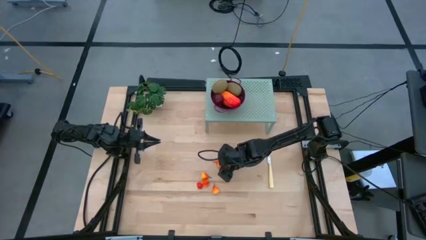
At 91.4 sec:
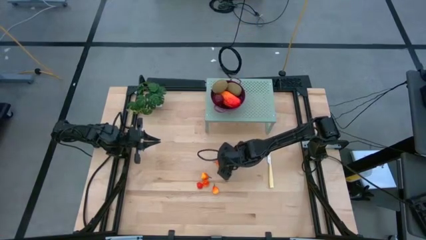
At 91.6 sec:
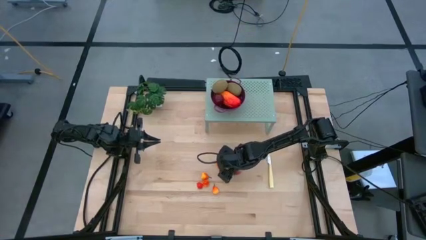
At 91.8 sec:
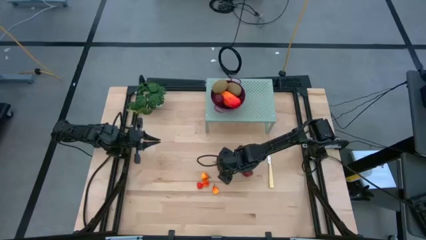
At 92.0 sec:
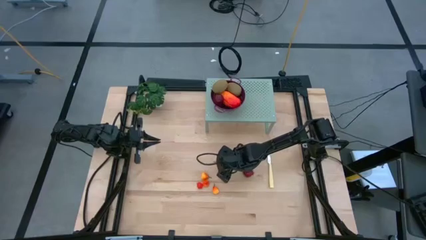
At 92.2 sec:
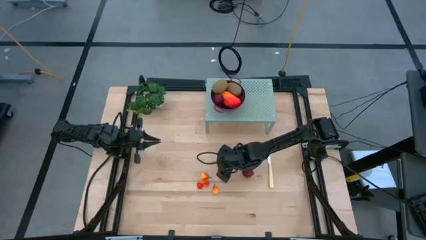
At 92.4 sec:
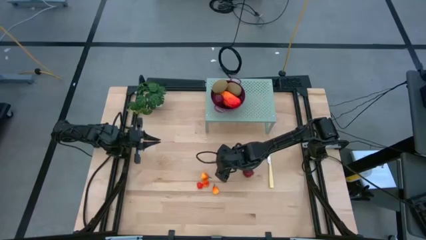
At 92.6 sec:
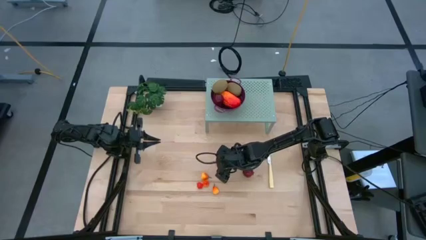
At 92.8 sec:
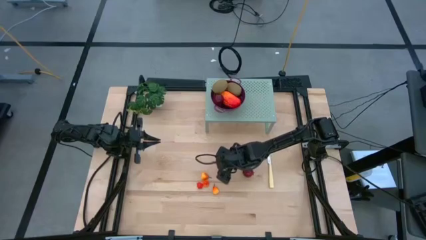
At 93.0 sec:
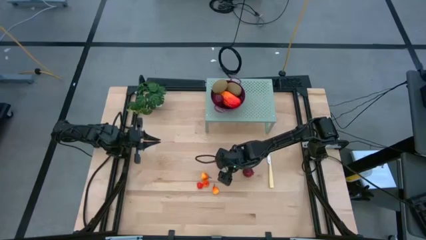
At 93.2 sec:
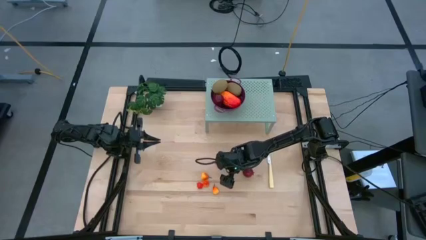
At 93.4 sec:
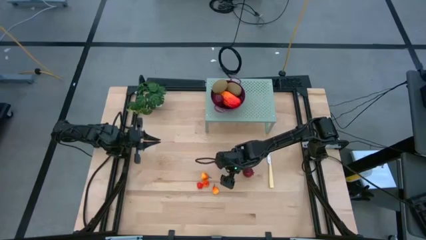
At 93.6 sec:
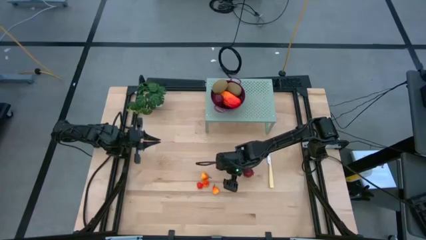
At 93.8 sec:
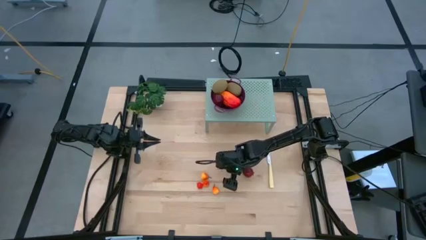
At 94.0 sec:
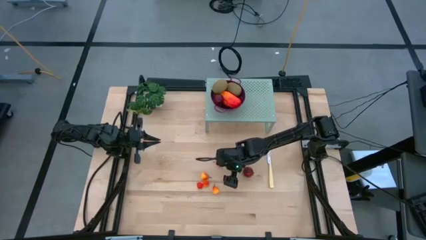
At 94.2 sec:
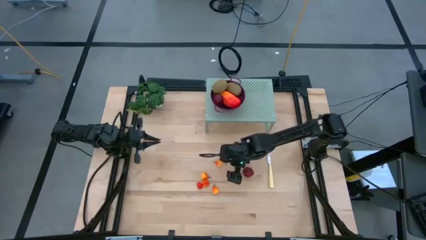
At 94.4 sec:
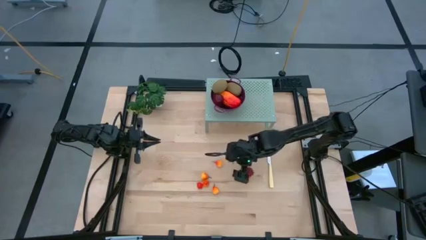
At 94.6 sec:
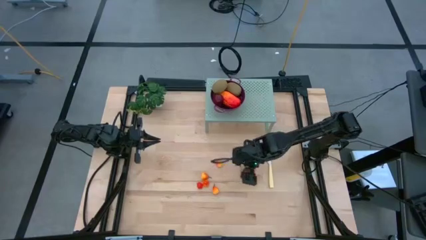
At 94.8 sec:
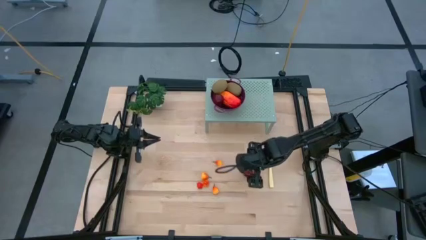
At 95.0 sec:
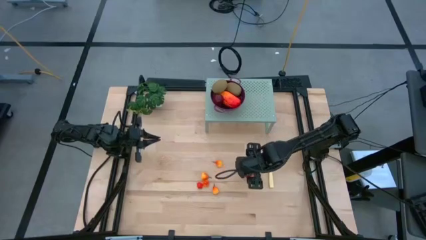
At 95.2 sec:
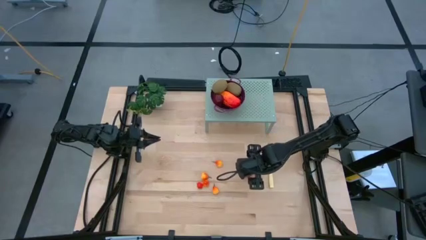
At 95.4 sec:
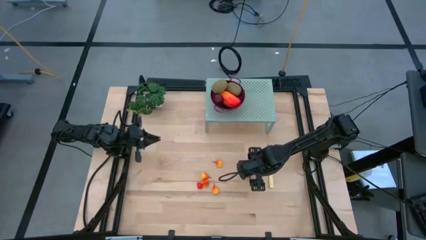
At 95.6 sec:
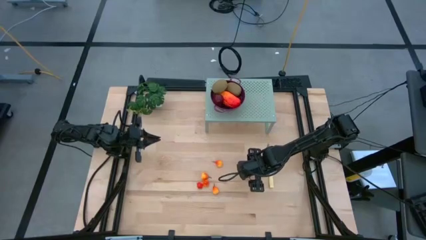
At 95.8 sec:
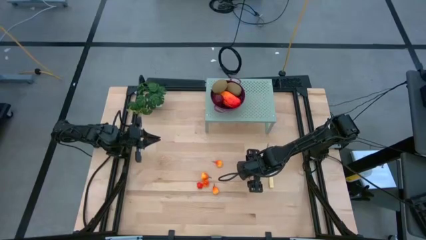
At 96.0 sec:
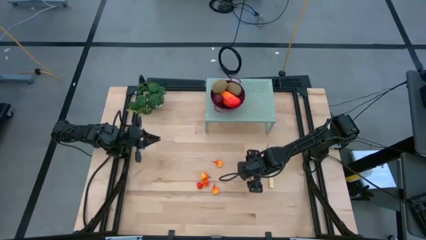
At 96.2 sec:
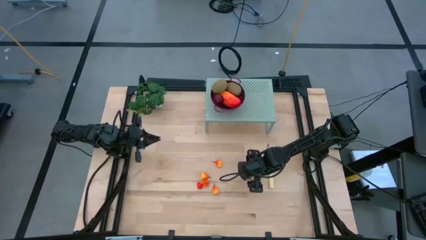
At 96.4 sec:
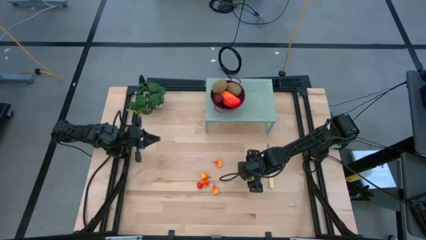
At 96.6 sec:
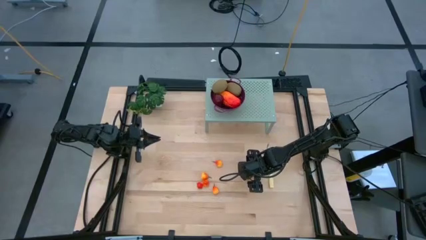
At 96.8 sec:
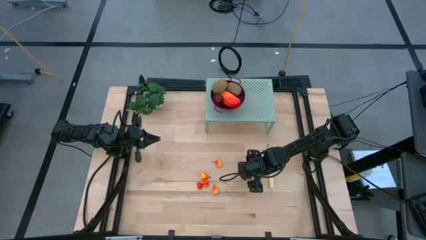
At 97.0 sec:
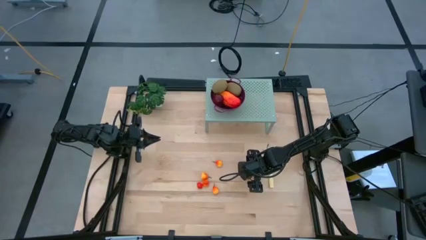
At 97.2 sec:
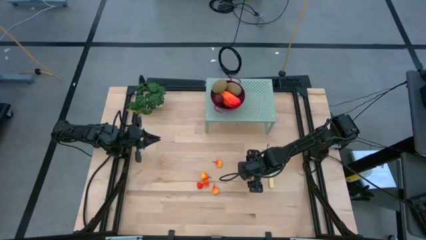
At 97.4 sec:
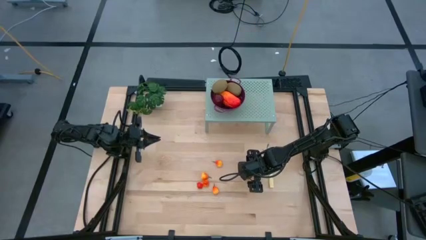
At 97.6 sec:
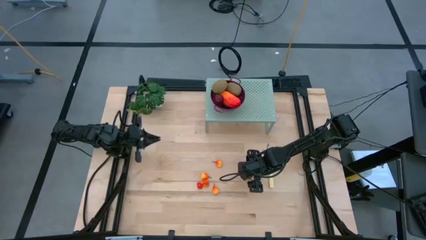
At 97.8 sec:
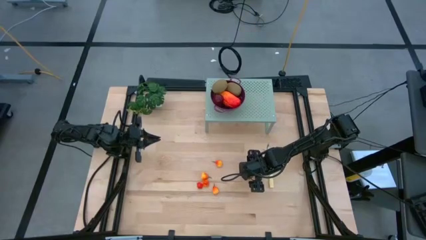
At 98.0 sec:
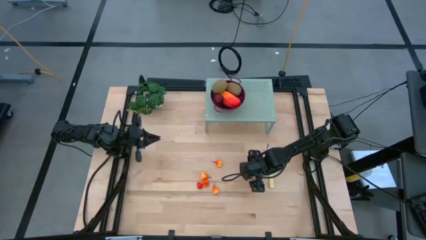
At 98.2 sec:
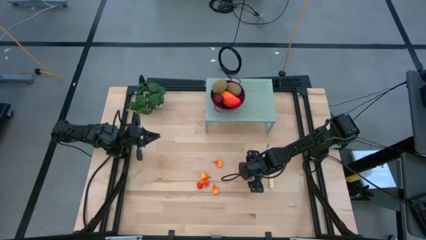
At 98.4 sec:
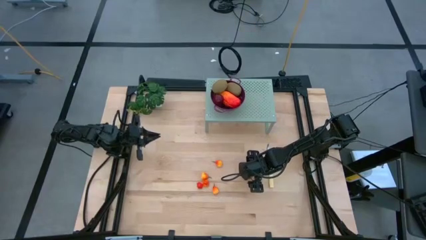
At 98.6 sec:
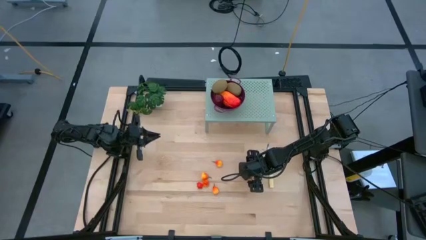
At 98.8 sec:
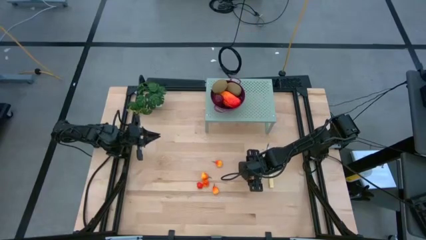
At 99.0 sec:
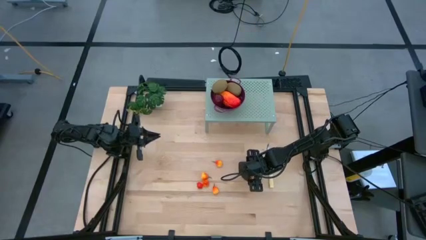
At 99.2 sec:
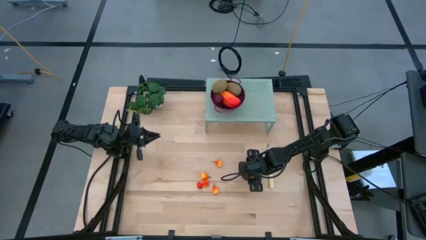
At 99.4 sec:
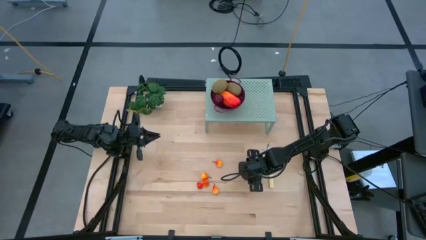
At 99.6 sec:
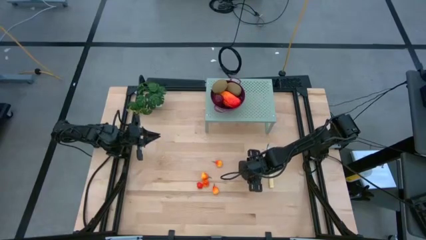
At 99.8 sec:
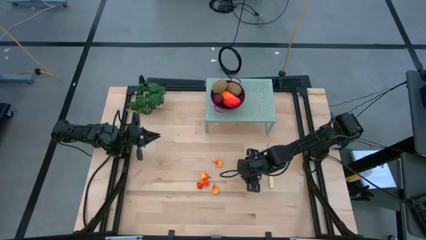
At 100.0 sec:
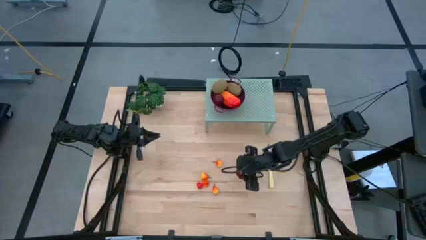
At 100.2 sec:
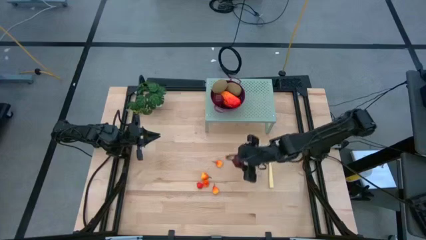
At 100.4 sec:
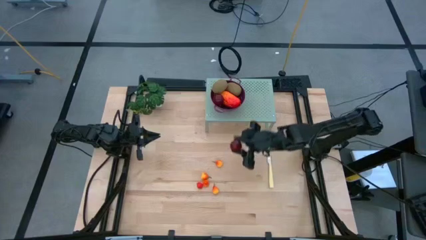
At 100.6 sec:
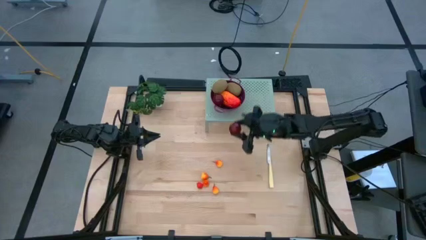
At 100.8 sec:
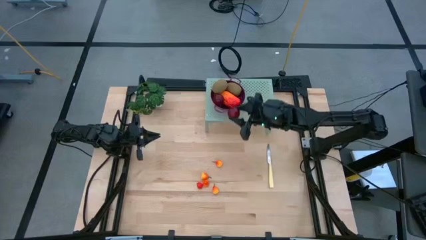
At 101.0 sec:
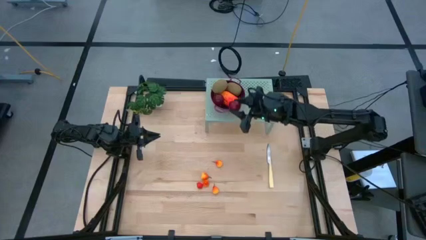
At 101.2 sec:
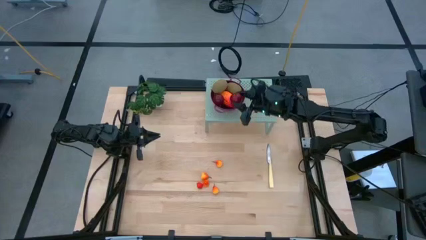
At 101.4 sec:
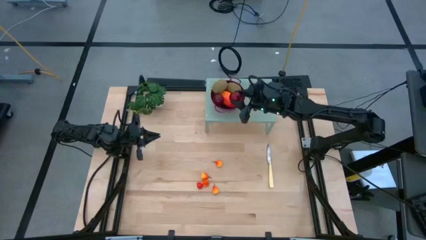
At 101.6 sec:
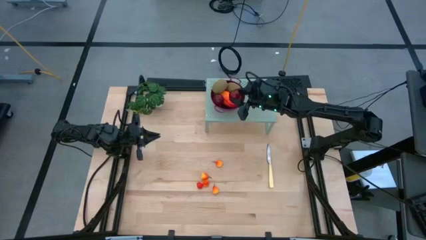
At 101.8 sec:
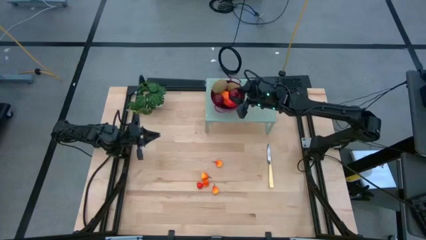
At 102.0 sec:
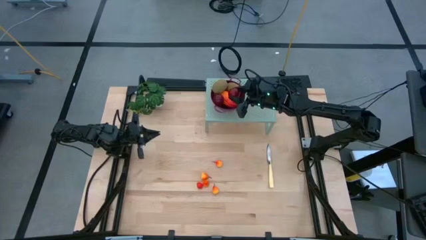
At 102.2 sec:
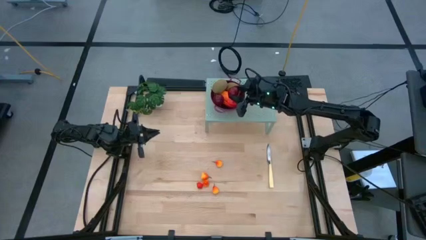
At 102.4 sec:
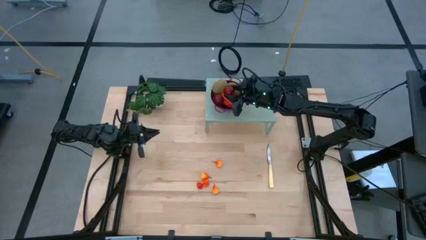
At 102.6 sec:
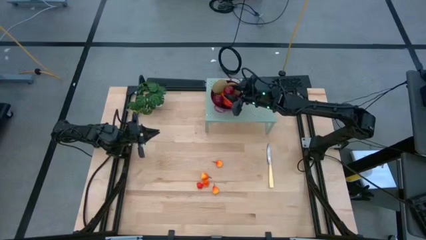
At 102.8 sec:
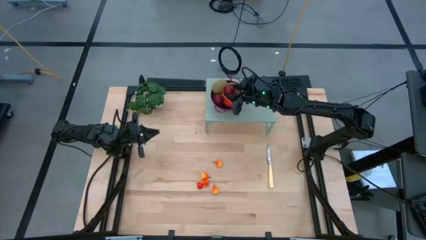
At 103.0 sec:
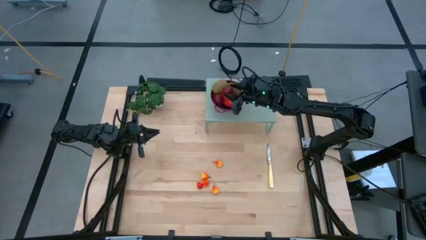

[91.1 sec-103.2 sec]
Task: Pick & Place Fruit
Put the pomegranate into the dark red colander on the shelf
